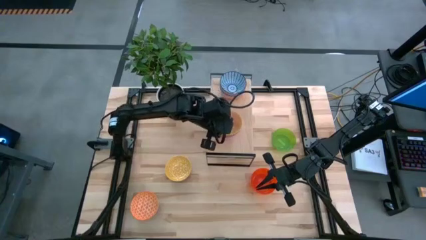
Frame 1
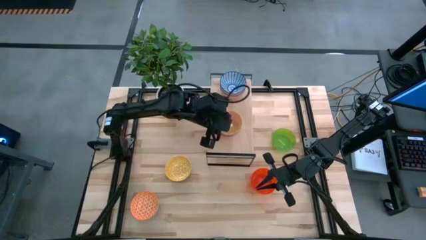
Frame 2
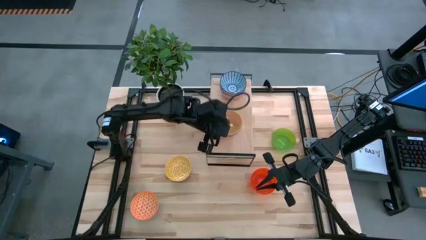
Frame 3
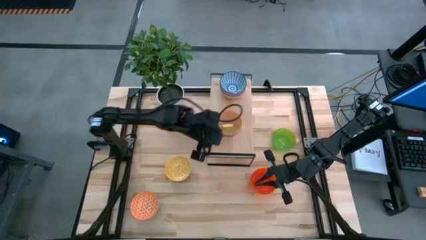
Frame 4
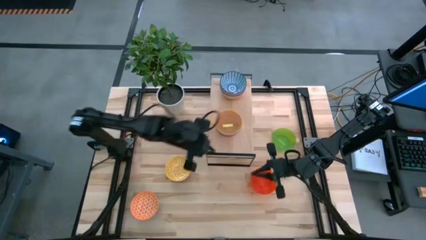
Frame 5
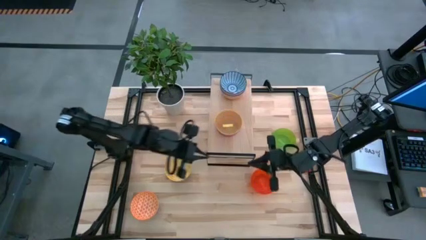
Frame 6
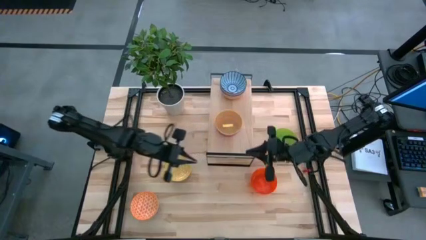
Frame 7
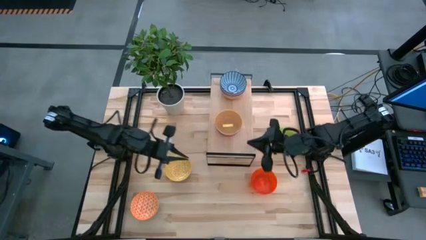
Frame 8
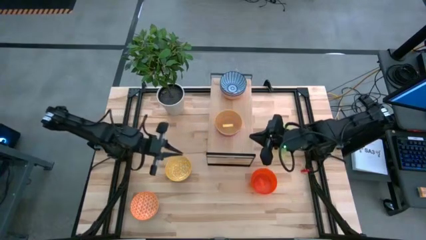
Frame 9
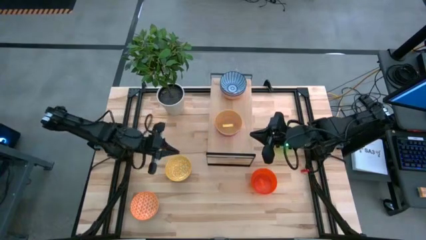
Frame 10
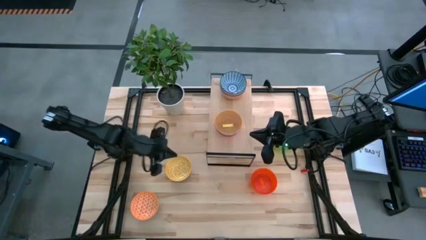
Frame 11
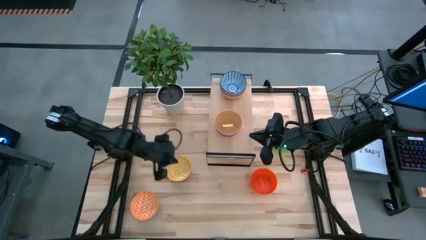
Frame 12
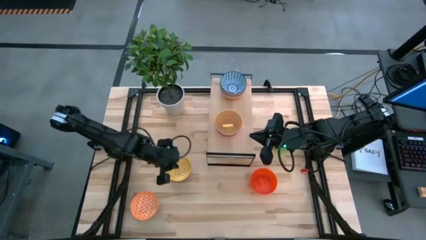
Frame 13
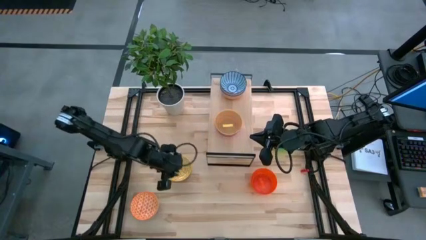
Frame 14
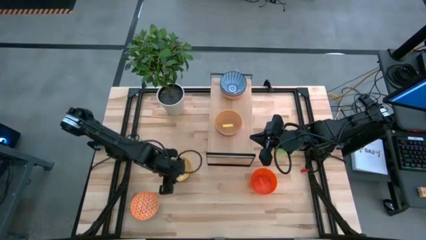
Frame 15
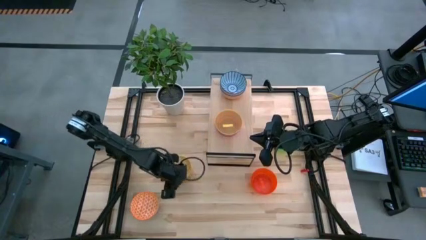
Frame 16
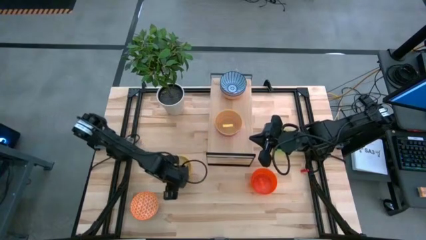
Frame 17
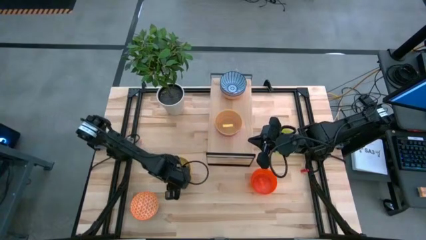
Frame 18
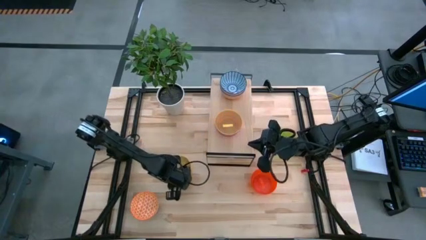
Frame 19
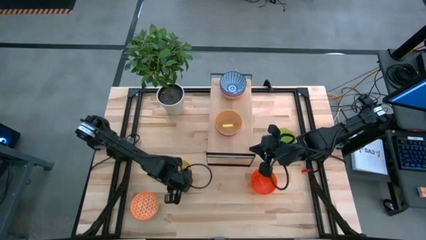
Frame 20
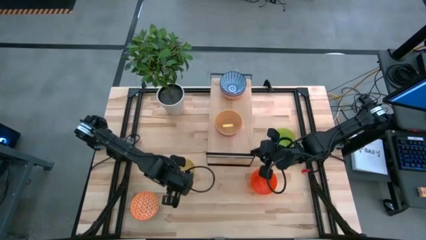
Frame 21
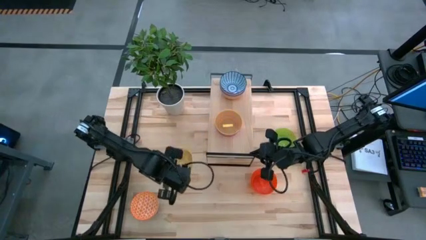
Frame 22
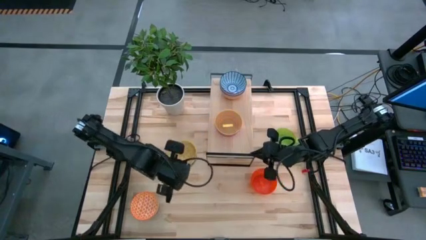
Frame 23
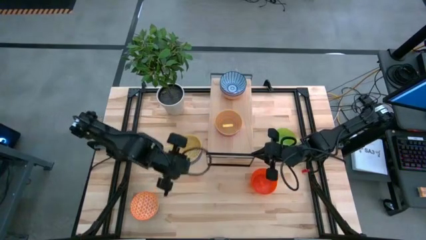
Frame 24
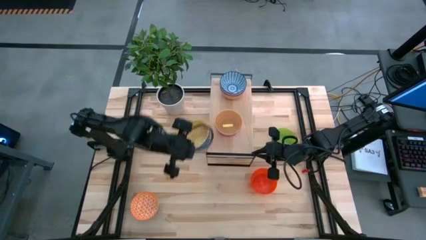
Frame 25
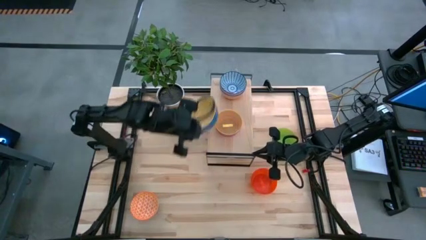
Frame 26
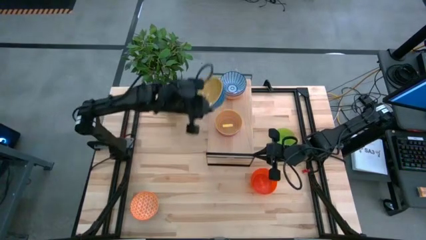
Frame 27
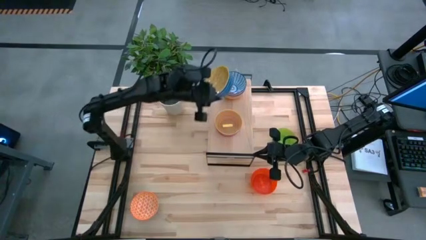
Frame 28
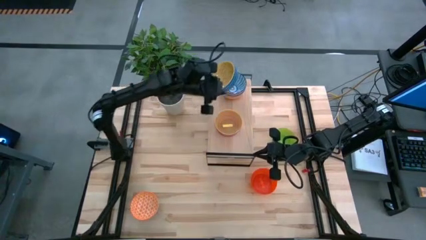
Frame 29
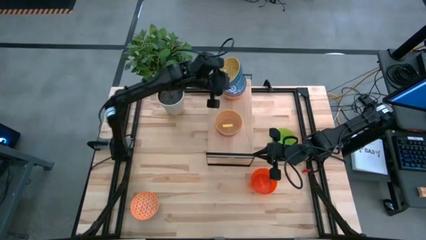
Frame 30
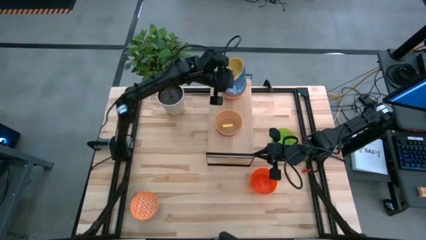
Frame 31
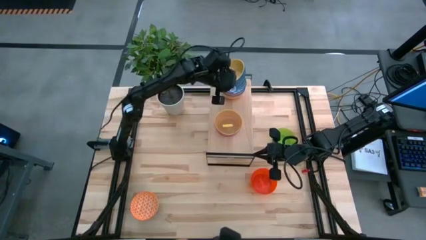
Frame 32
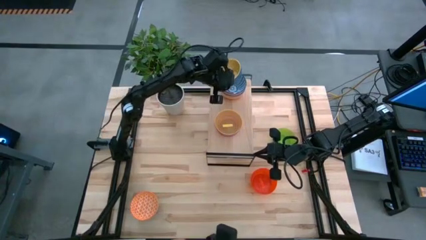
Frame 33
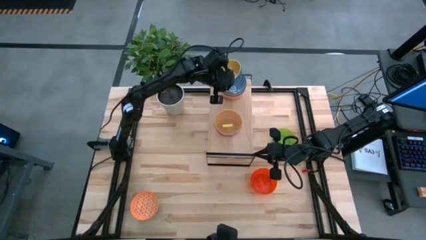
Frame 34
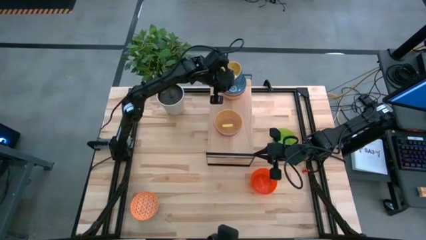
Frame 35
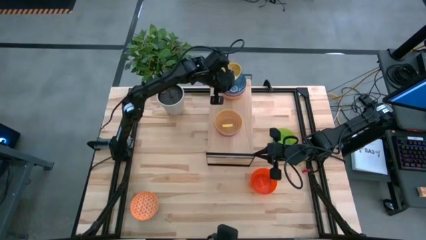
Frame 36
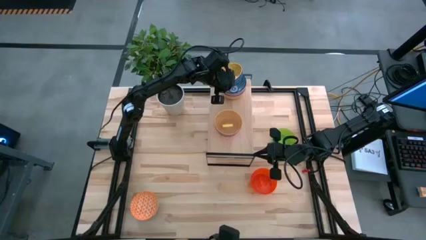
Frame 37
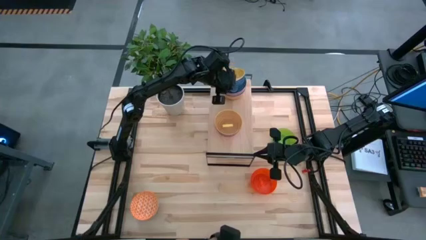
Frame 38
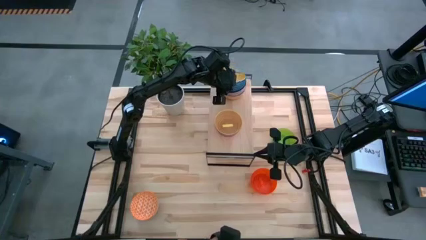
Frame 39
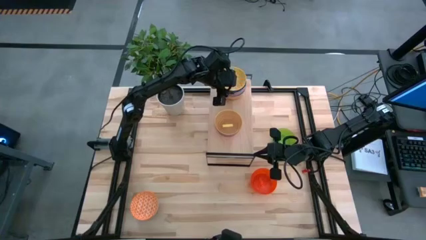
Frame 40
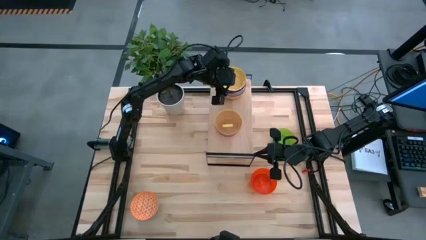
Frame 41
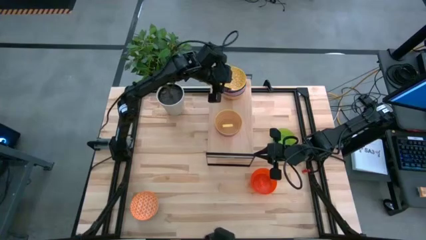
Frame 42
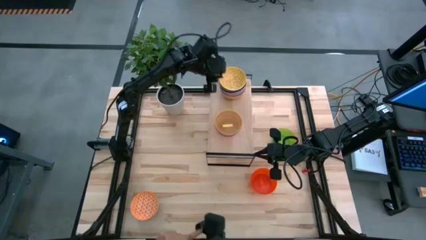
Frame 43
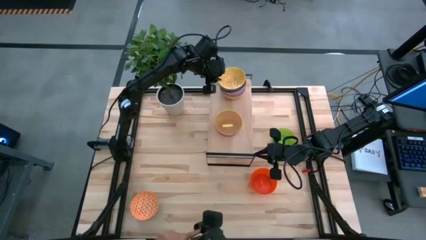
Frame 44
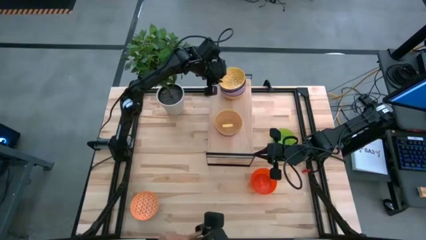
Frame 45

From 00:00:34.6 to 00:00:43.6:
Task: Place and stack bowls onto a shelf
Stack the yellow patterned bowl on top of the dark blue patterned bowl on the shelf

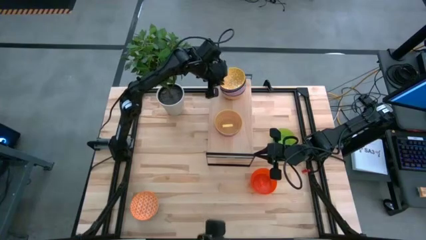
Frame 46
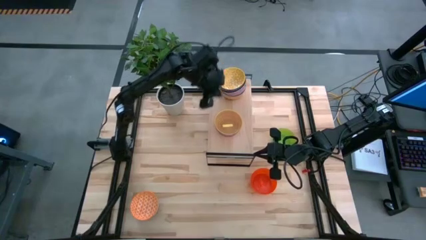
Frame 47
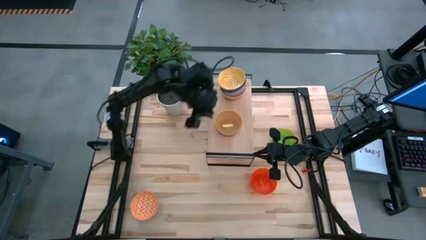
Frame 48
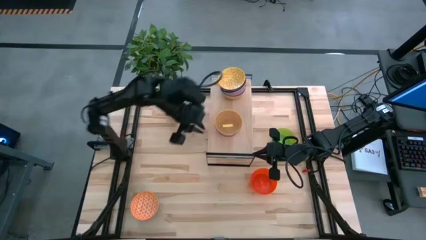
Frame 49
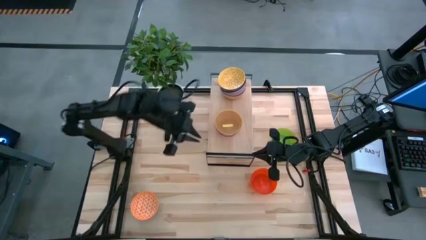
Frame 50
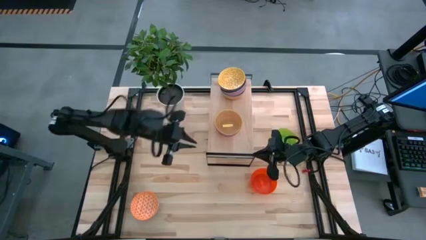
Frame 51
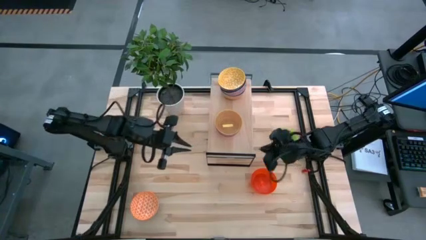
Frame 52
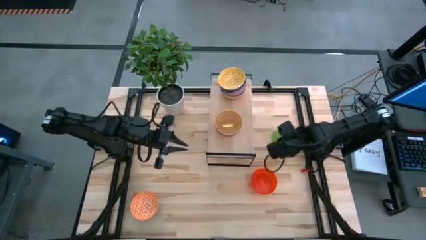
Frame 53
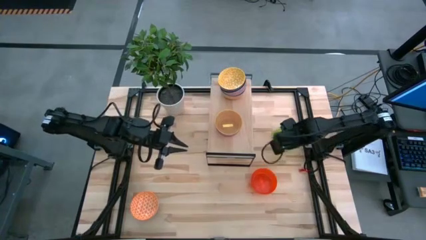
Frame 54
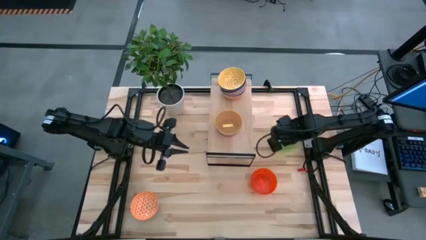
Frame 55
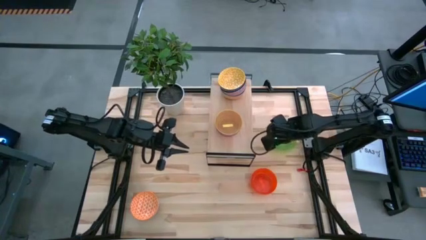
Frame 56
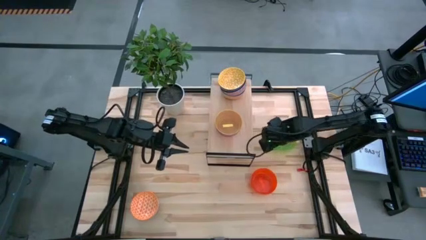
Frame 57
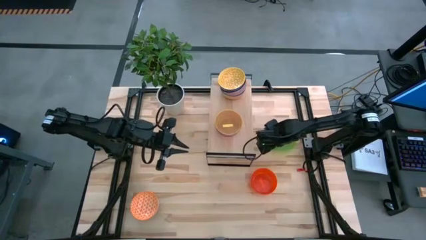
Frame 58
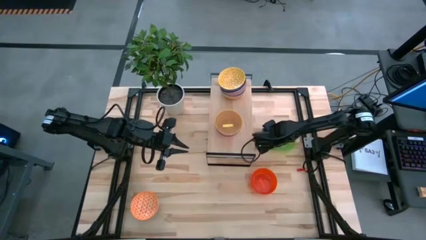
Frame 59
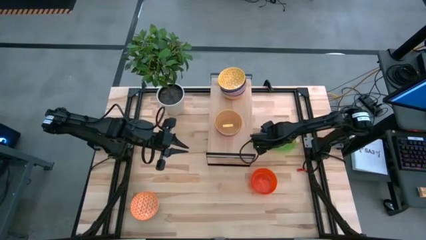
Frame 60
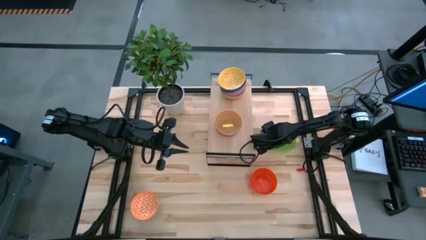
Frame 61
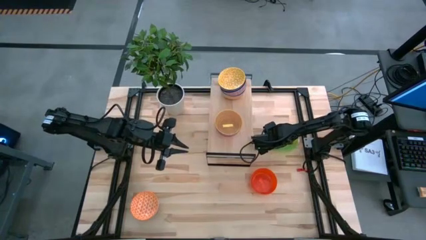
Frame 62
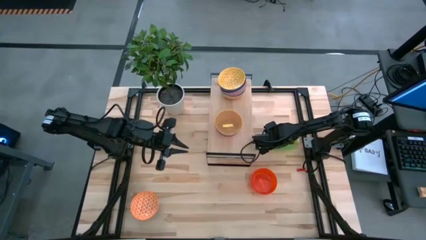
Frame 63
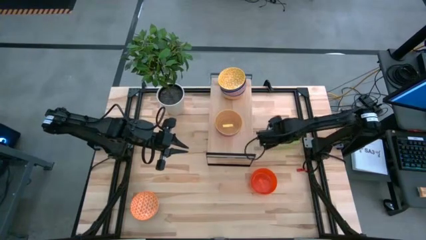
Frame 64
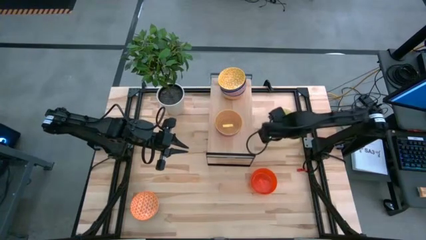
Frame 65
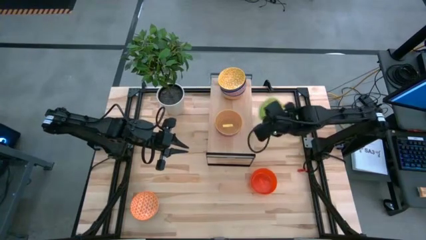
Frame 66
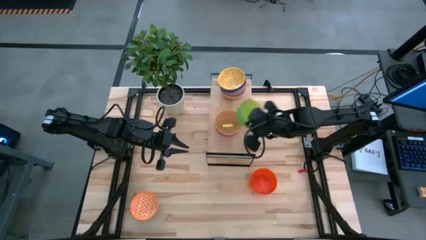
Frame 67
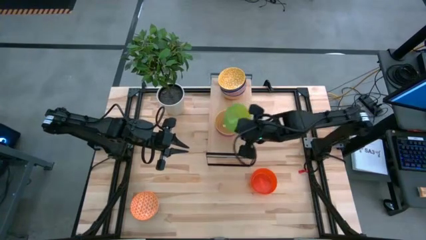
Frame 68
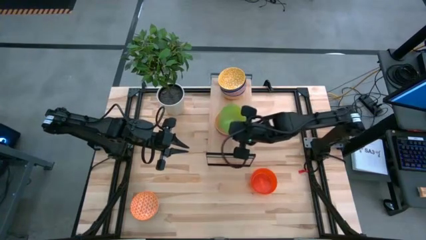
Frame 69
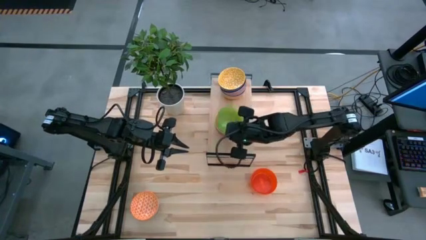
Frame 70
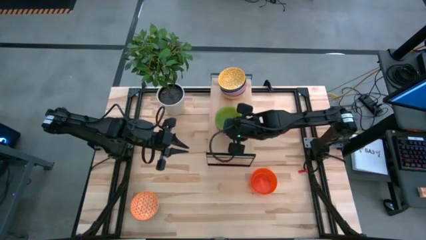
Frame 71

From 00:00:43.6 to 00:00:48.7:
Stack the green bowl on top of the yellow bowl on the shelf

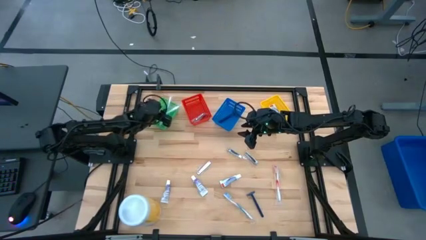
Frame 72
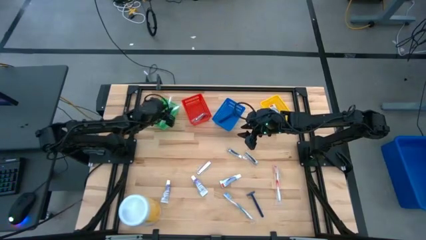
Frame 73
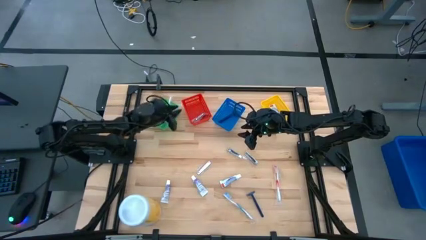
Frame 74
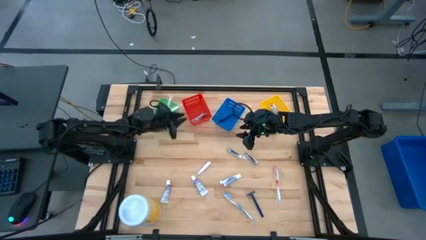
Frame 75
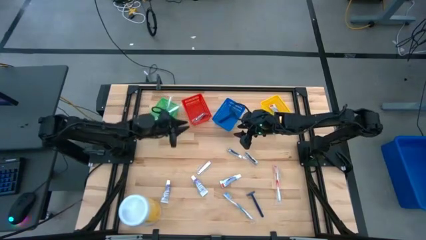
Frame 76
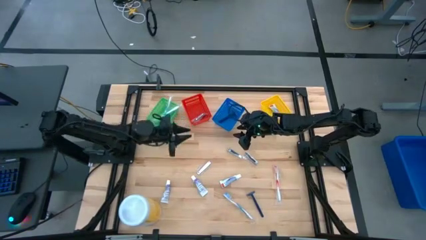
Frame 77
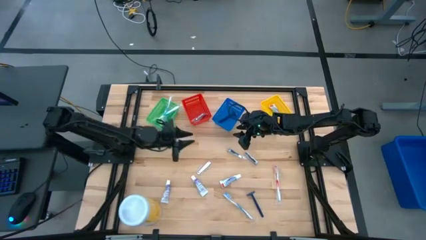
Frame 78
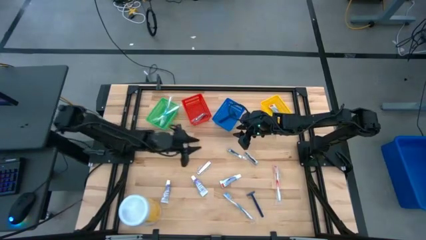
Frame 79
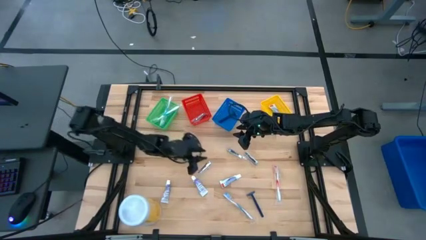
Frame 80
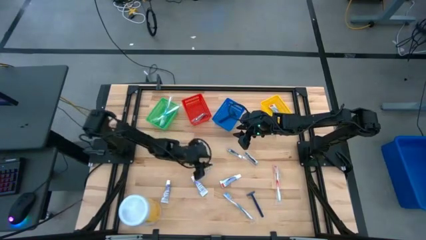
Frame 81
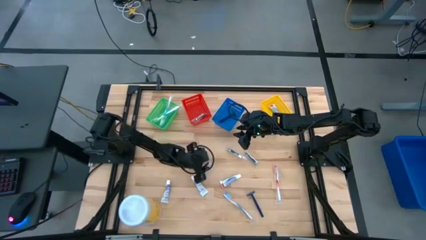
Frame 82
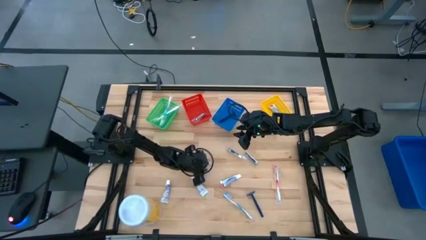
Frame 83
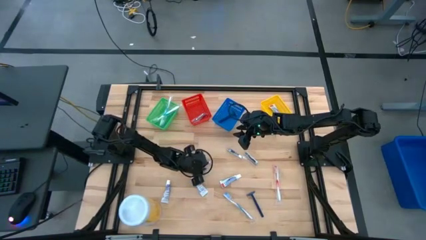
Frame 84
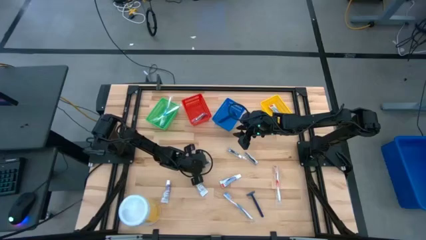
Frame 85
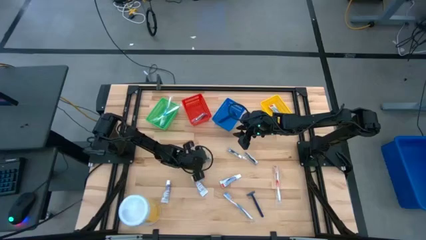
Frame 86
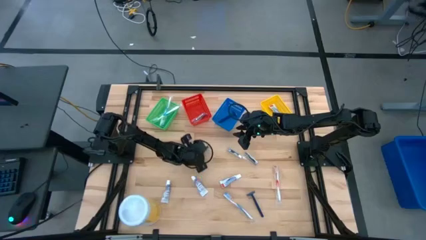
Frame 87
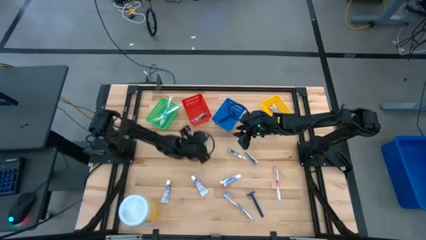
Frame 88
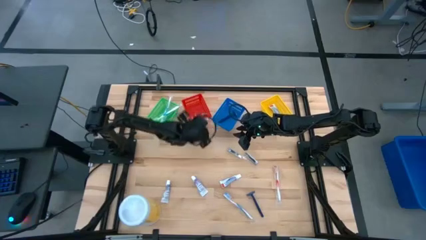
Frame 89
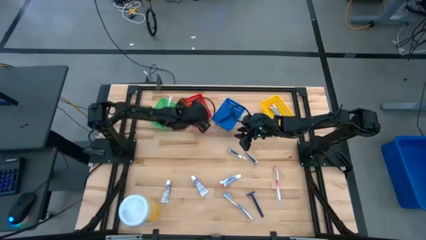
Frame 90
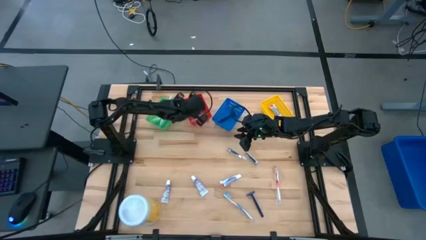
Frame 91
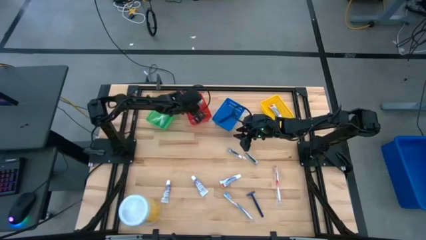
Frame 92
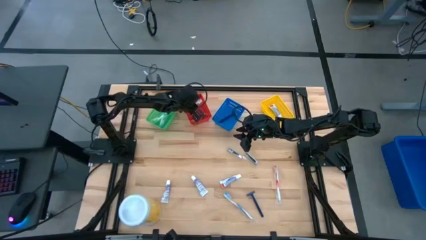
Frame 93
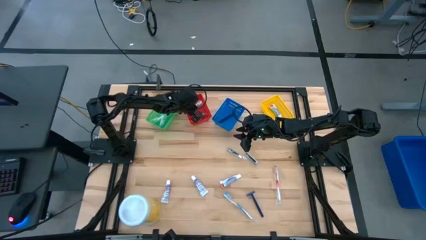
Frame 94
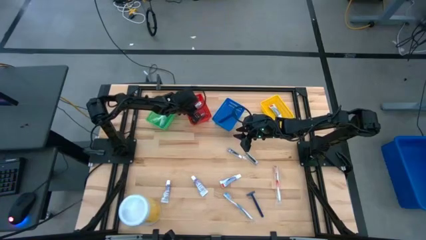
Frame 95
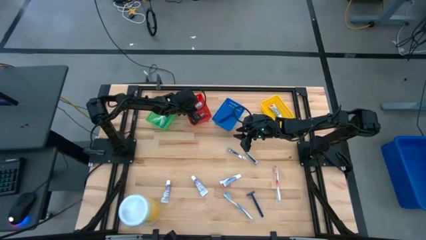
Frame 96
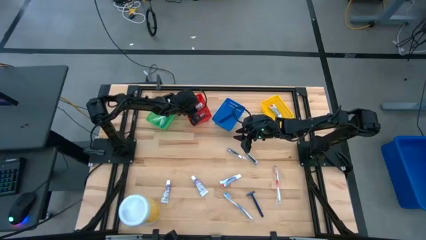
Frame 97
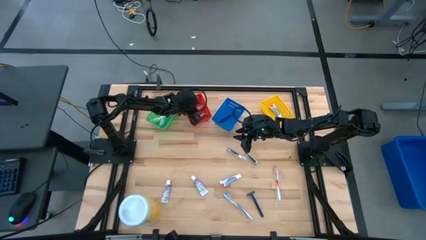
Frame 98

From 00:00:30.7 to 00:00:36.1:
Task: Pick & Place Travel size toiletries
Put the left nail cutter into the red basket
